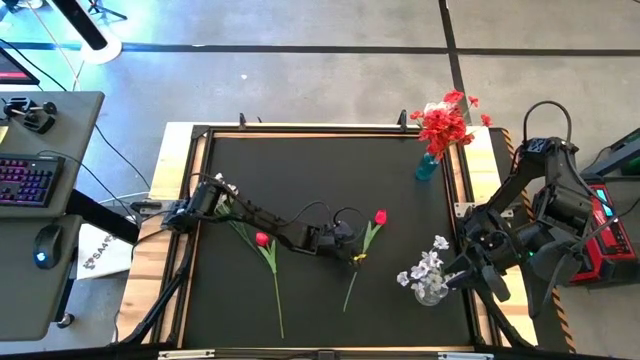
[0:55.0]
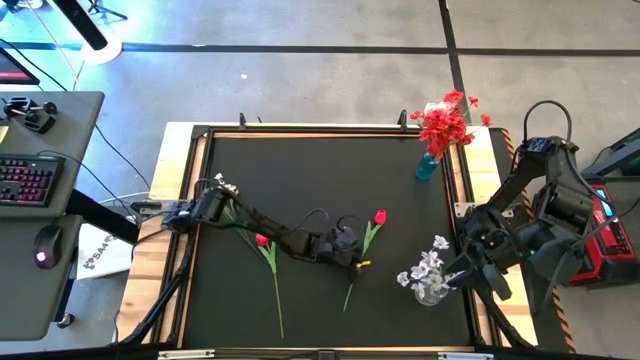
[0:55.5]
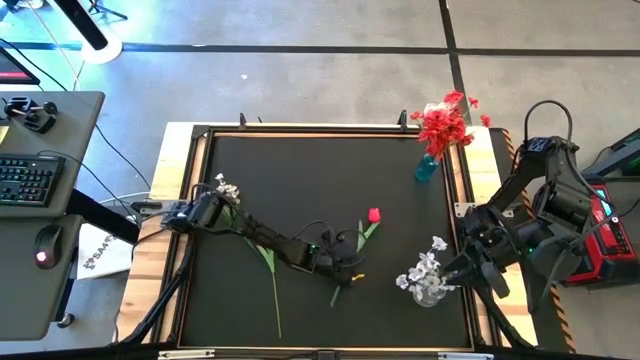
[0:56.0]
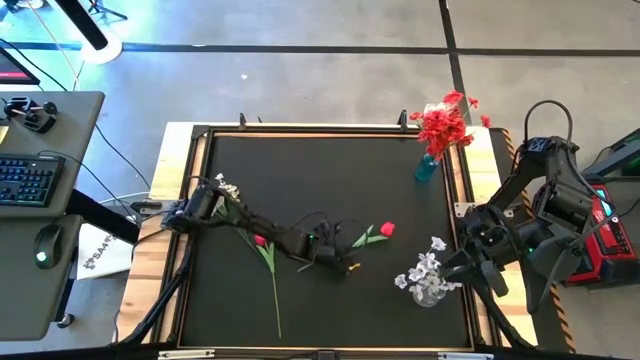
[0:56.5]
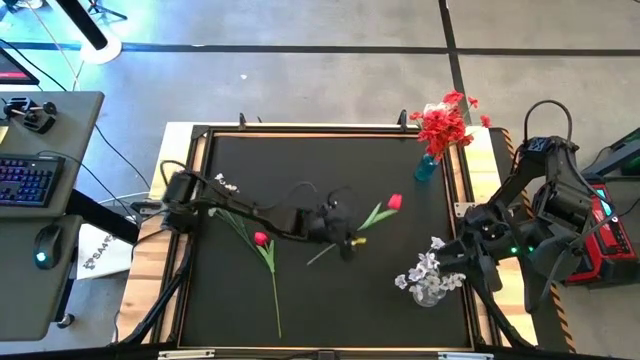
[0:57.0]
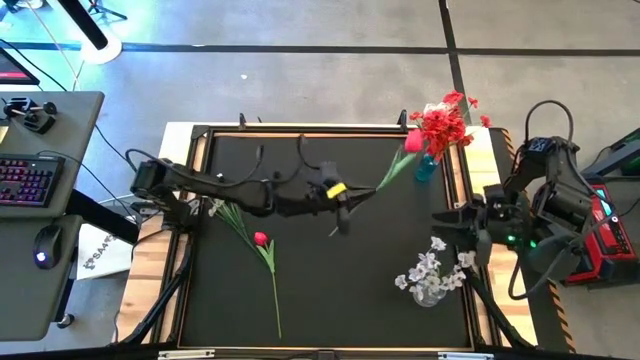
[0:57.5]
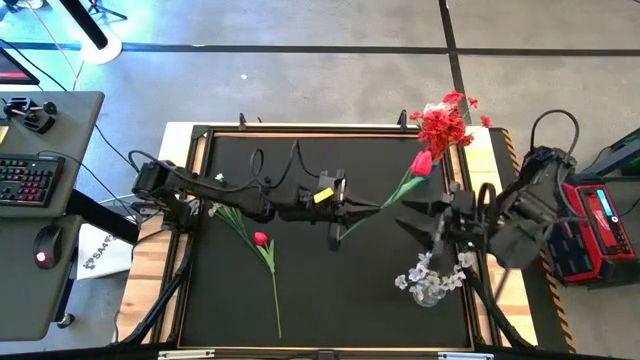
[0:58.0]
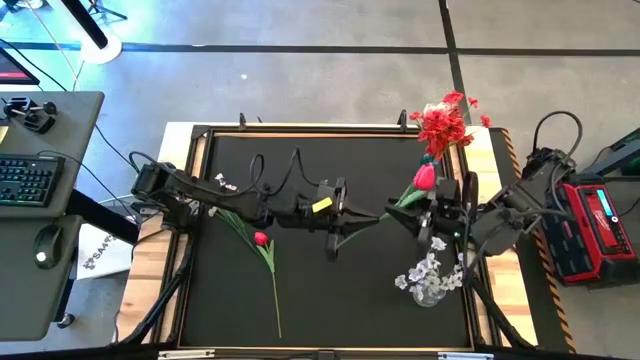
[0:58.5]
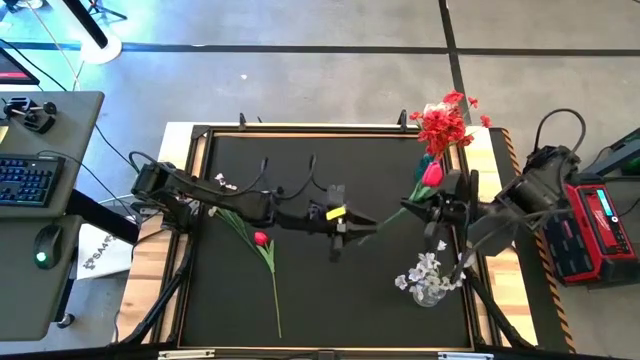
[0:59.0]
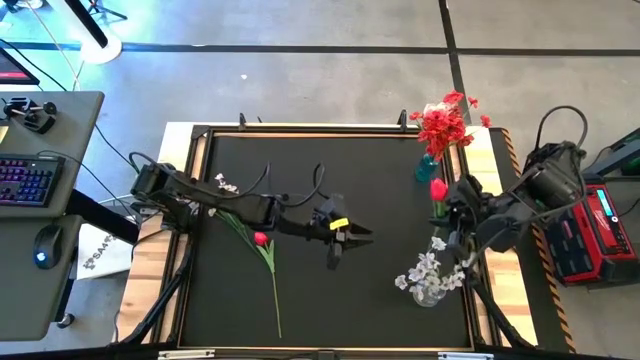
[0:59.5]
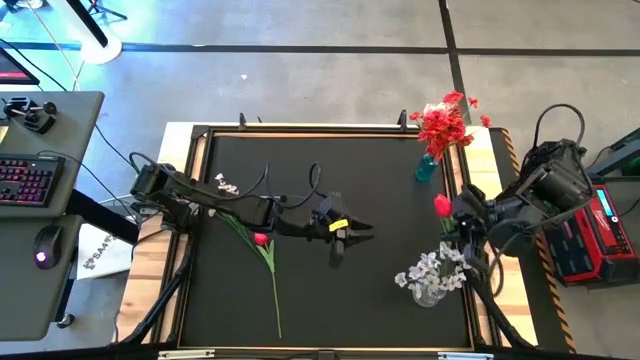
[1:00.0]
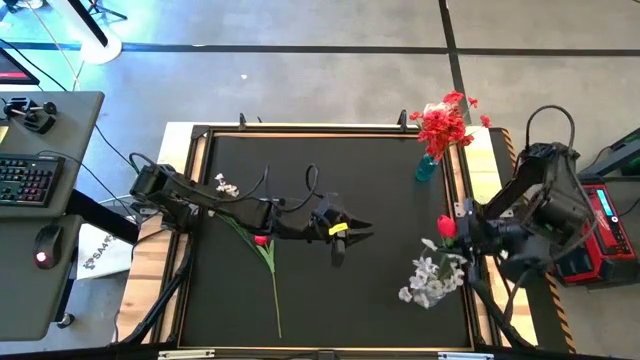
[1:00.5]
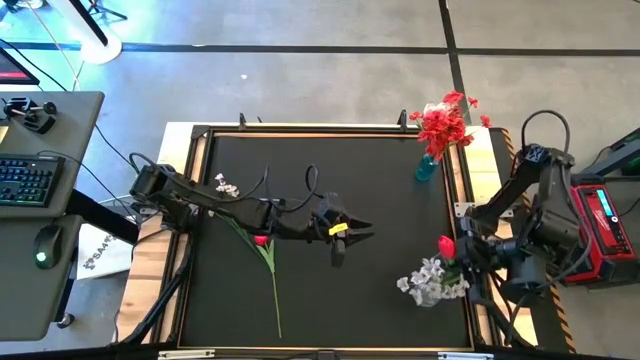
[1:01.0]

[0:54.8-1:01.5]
Task: Sort flowers into vase by color
Put the right red flower into the transparent vase

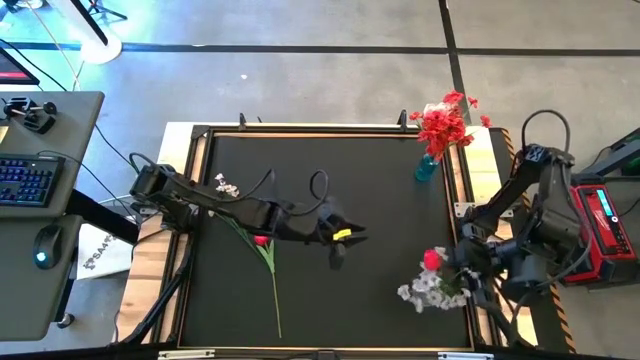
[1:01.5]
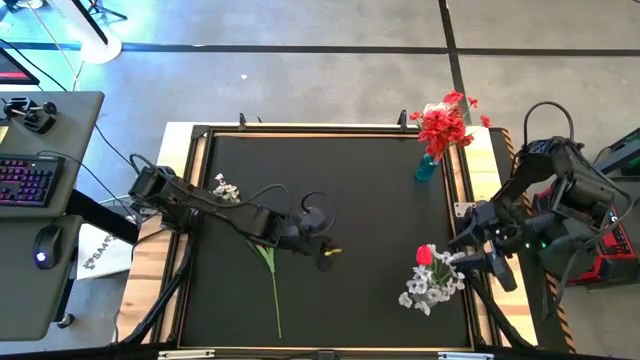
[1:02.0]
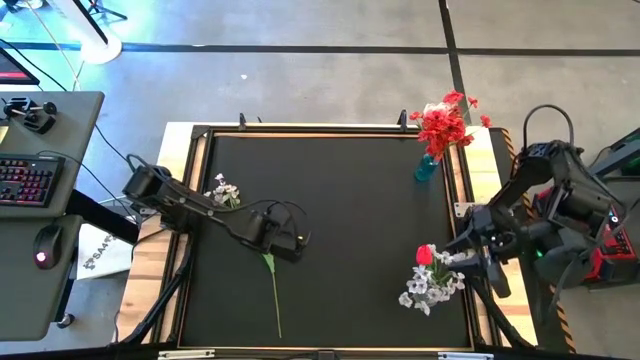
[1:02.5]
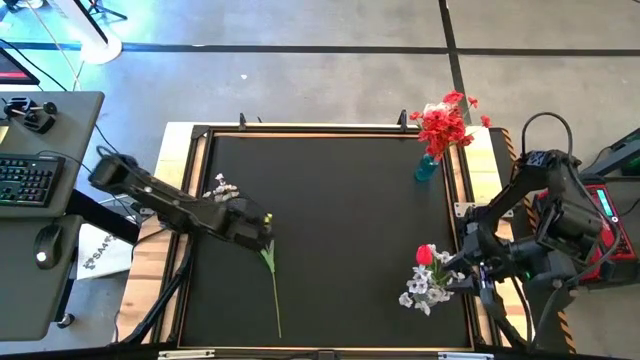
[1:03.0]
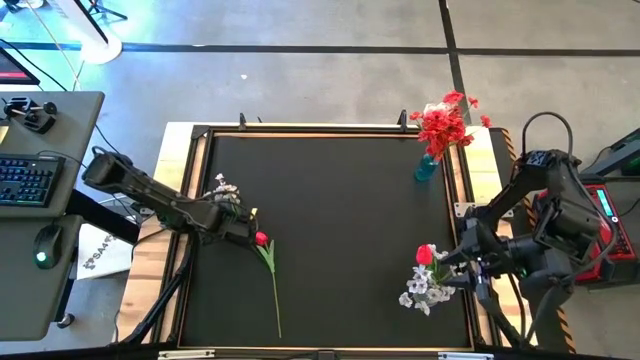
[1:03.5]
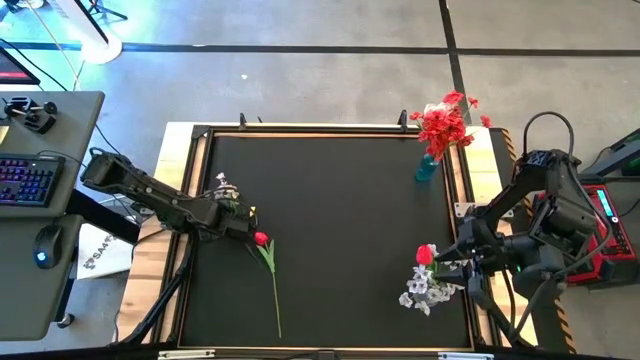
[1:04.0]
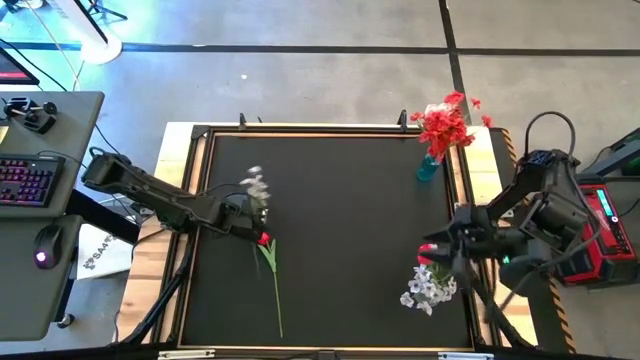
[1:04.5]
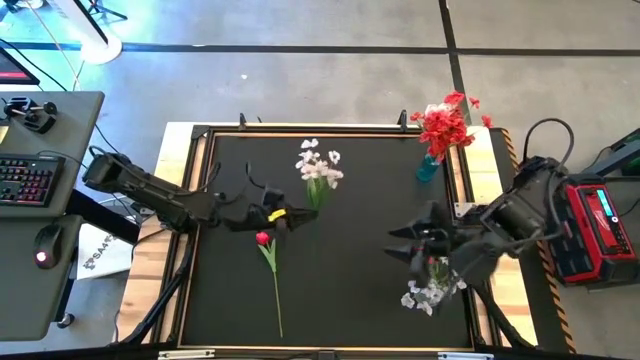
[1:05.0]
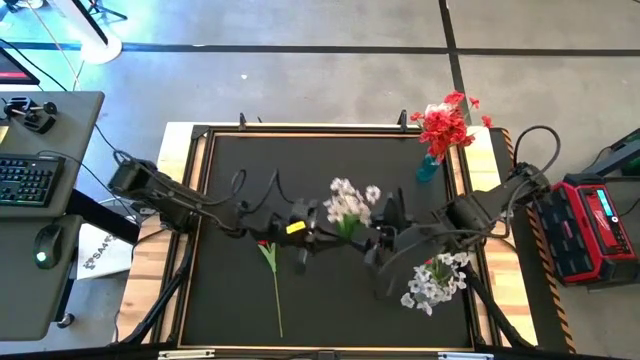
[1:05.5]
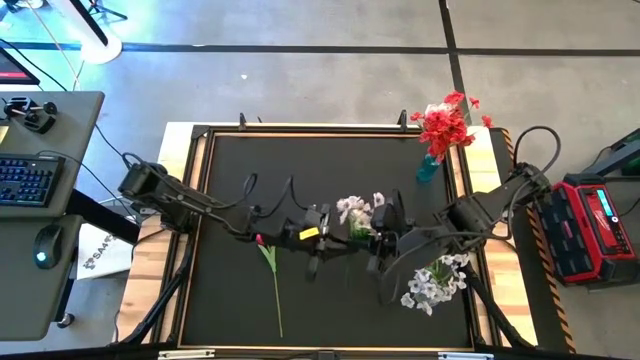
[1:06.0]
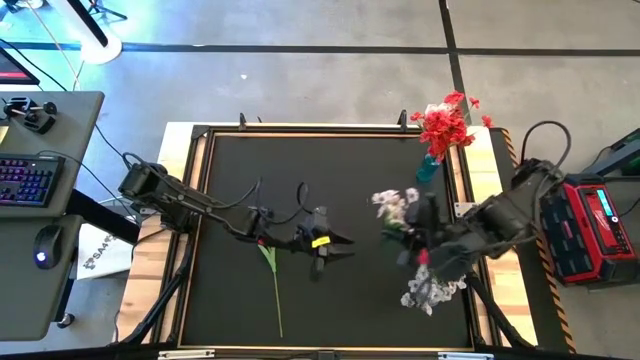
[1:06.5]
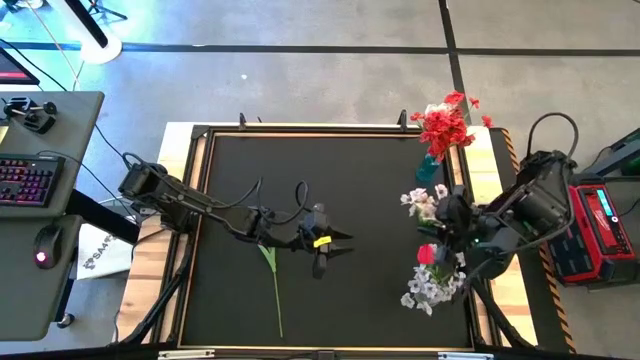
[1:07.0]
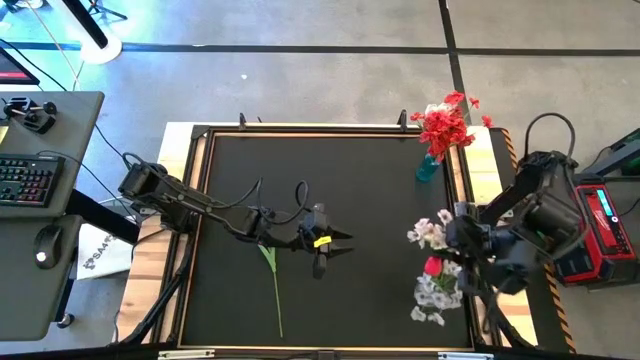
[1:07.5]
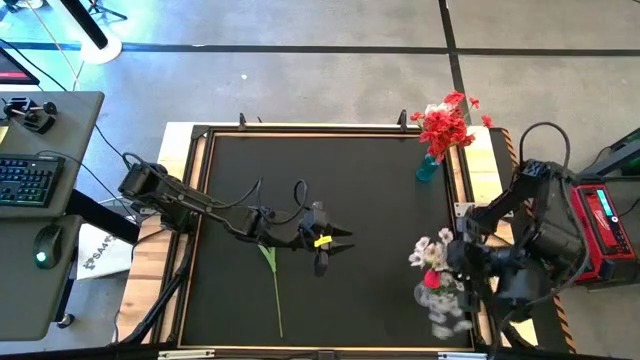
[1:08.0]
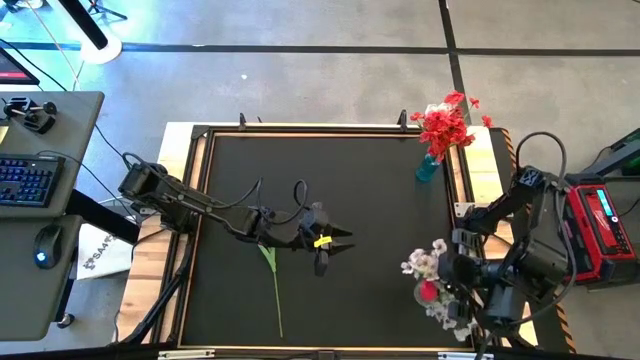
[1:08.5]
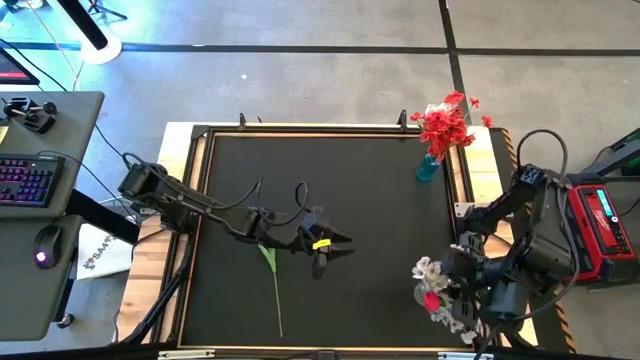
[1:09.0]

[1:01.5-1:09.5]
Put the white flowers into the transparent vase

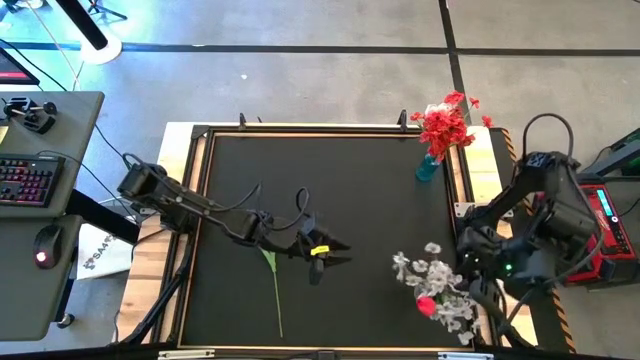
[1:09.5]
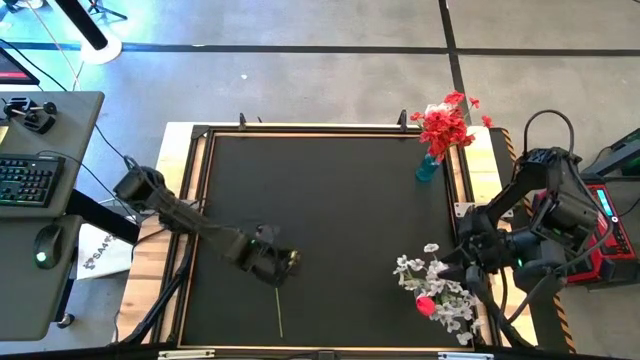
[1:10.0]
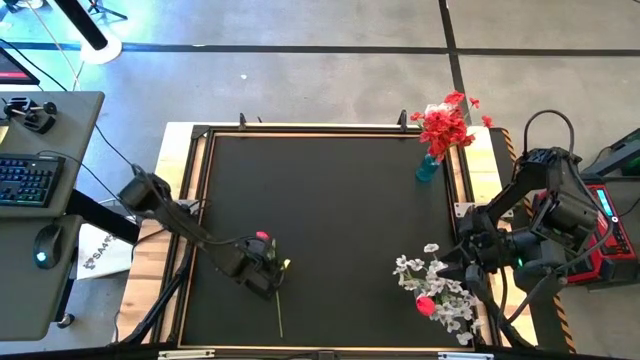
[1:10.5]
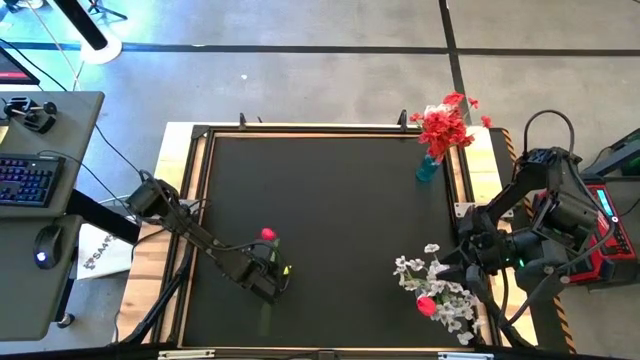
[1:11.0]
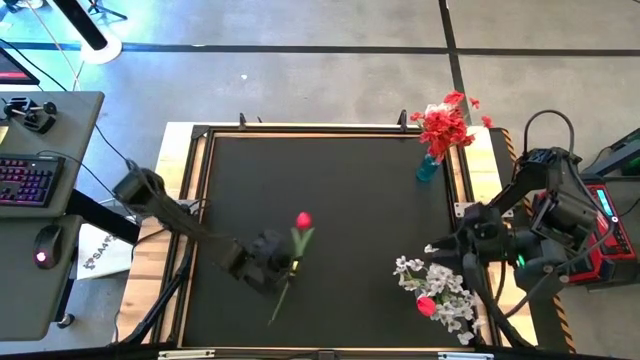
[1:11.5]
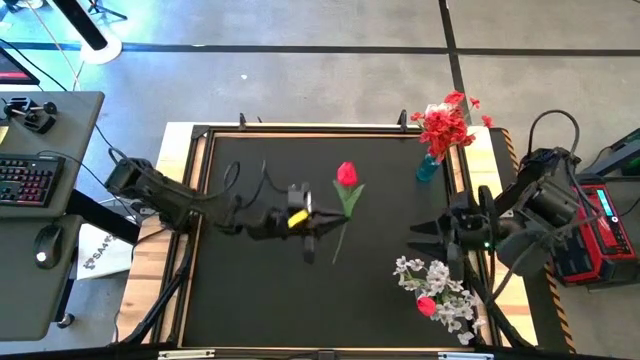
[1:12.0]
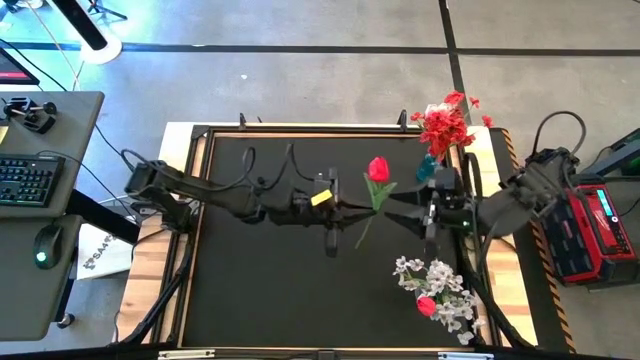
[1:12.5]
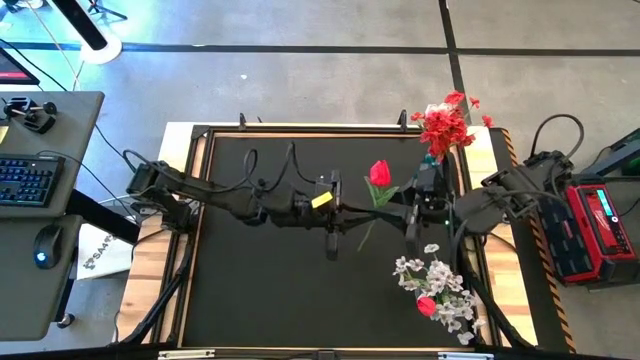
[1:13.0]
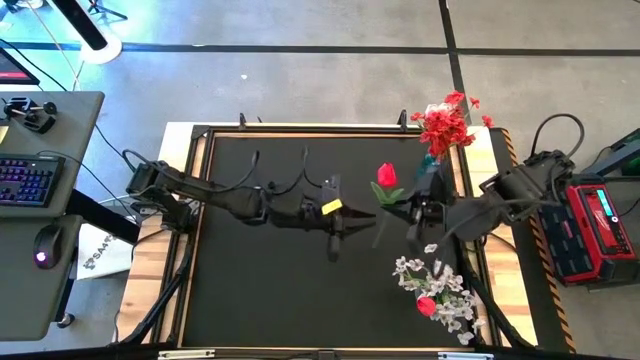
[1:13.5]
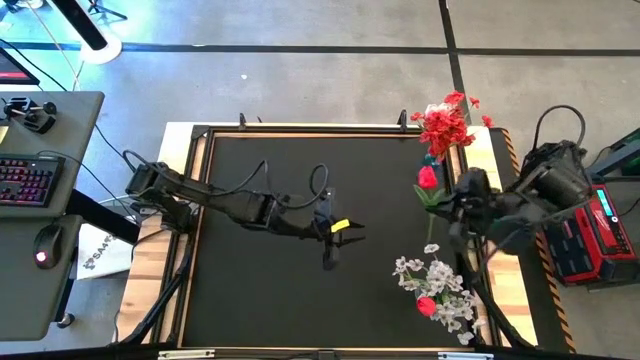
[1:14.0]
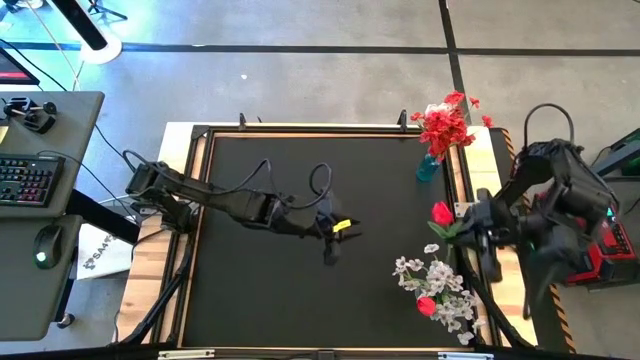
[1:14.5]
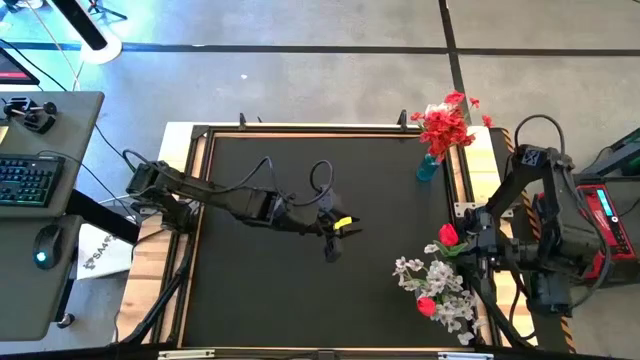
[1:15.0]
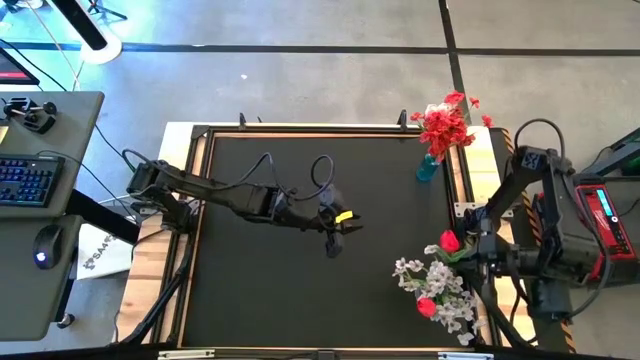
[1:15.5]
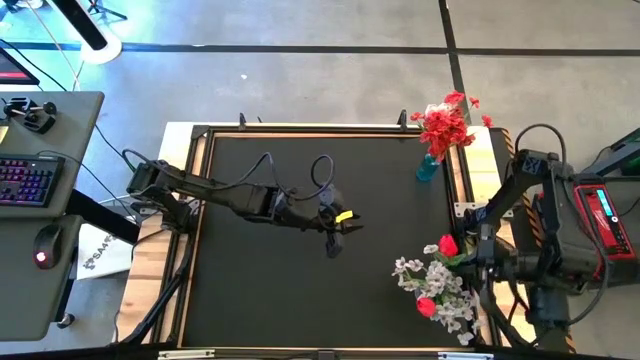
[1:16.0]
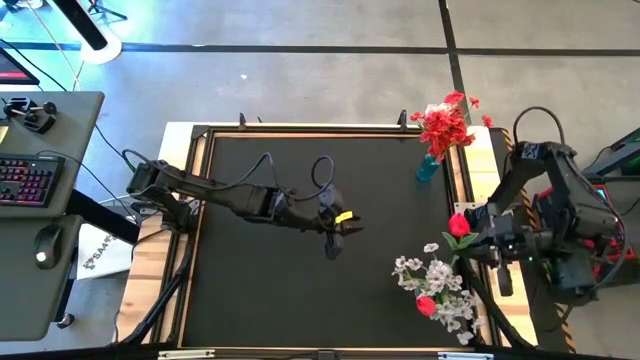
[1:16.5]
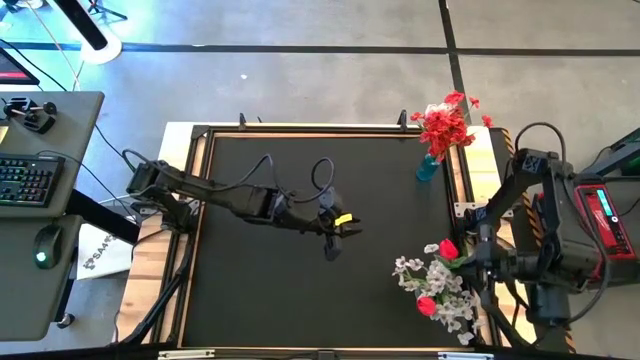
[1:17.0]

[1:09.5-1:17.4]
Put the red flower into the transparent vase
